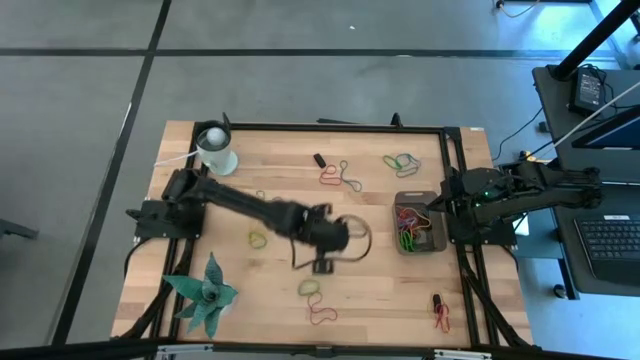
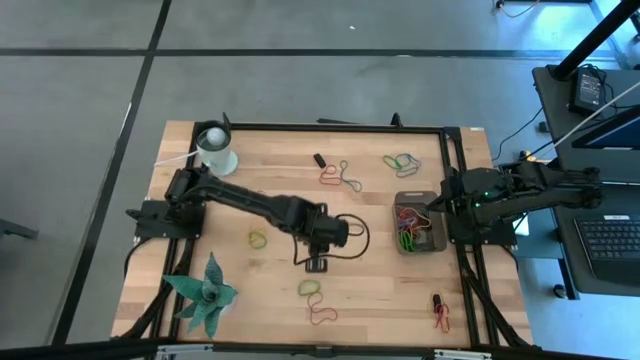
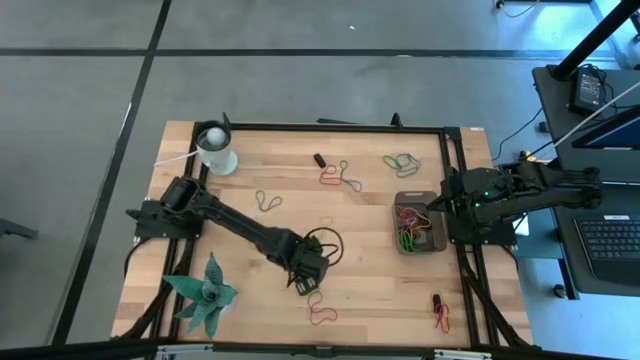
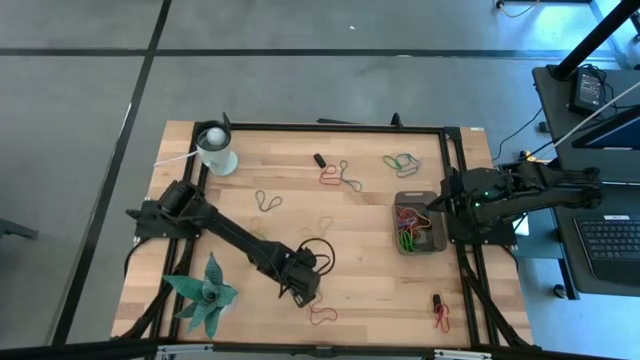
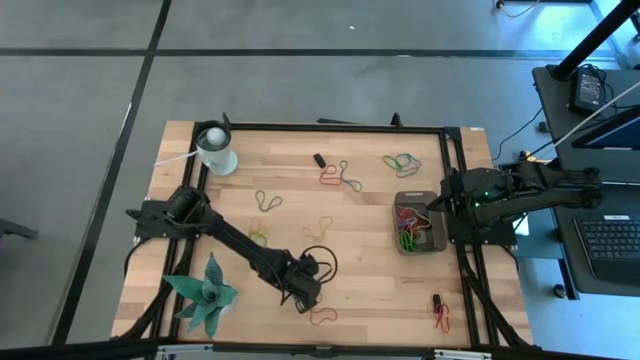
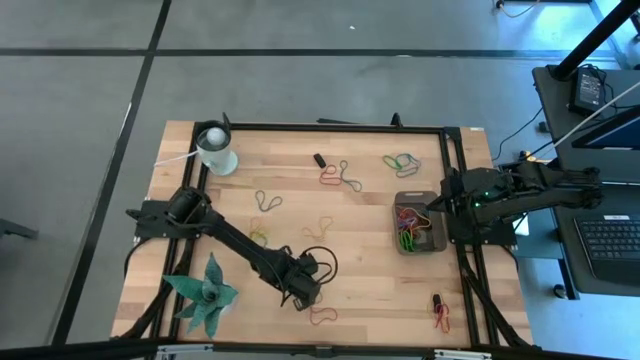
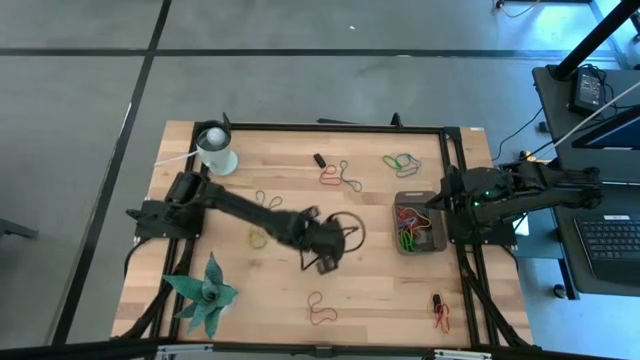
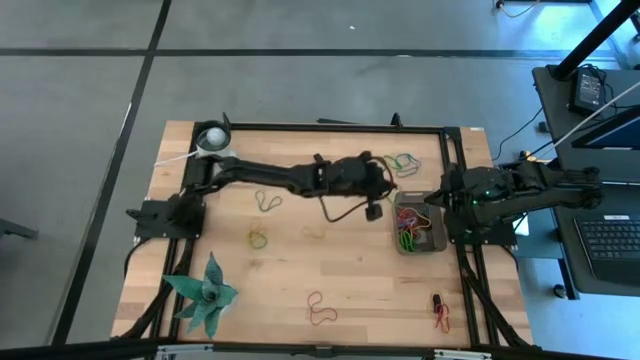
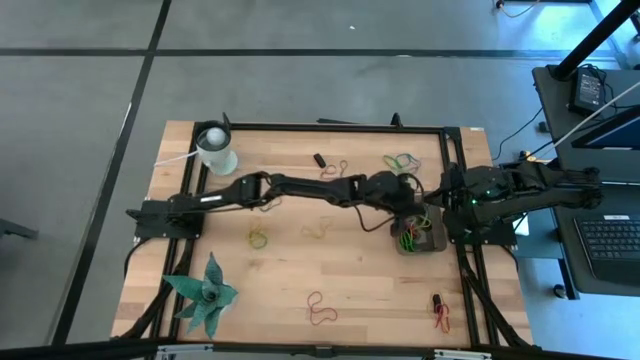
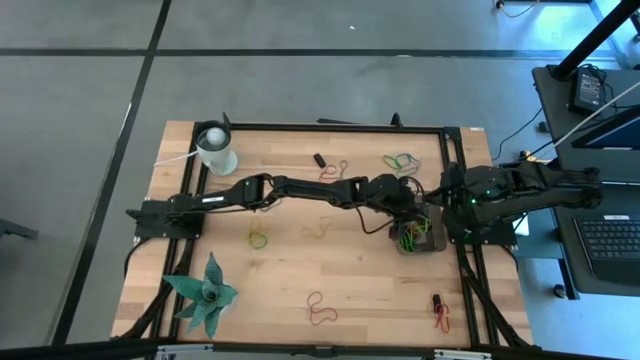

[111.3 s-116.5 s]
Task: Pick and place rubber bands into bin
Put the green rubber band into the black bin

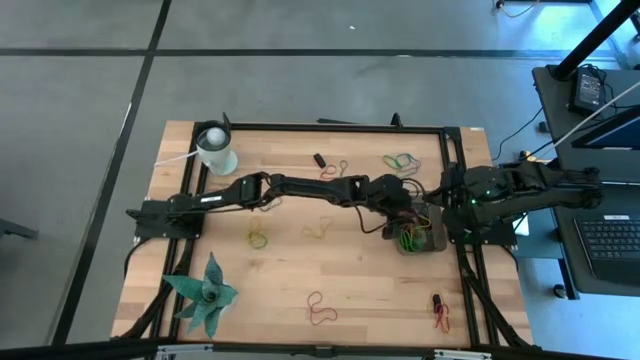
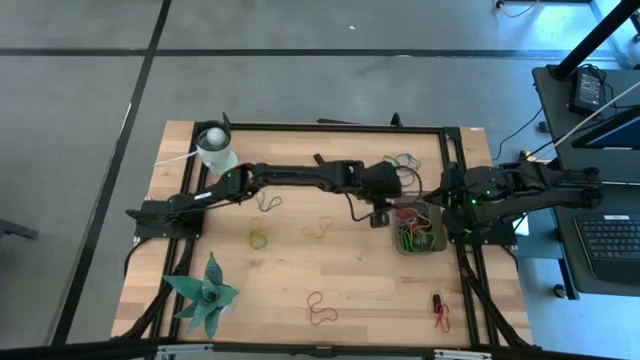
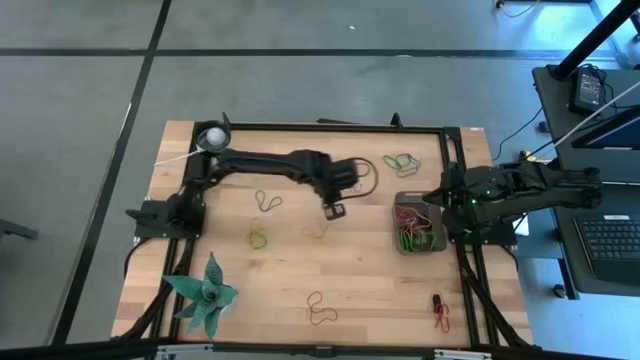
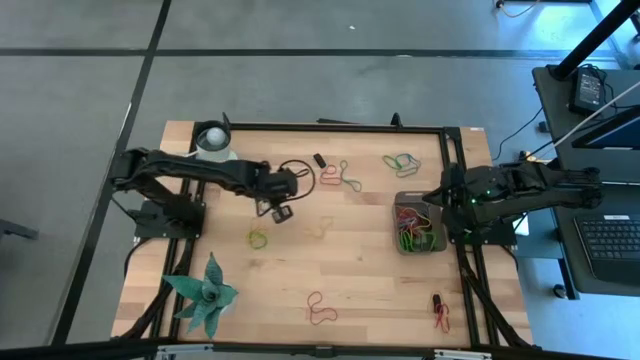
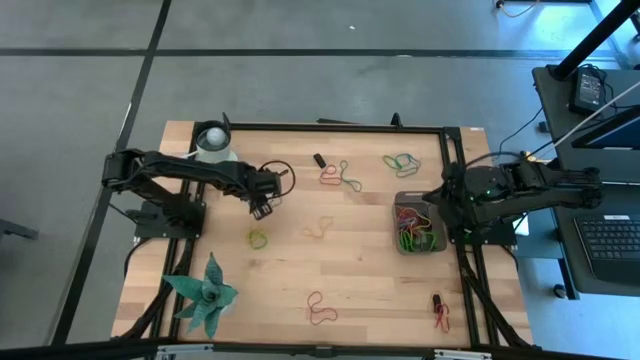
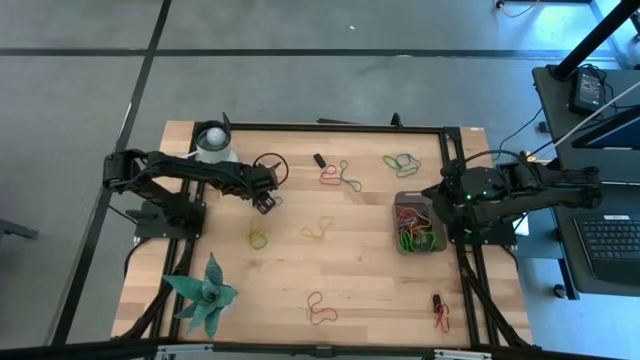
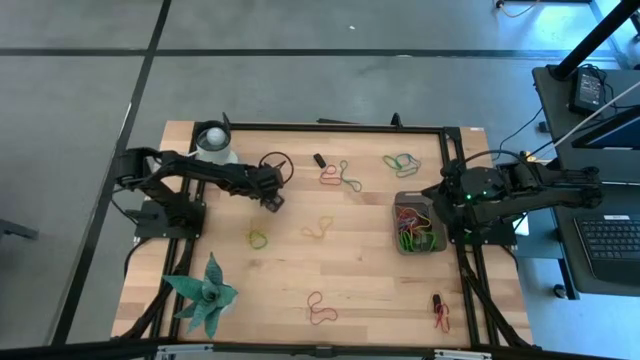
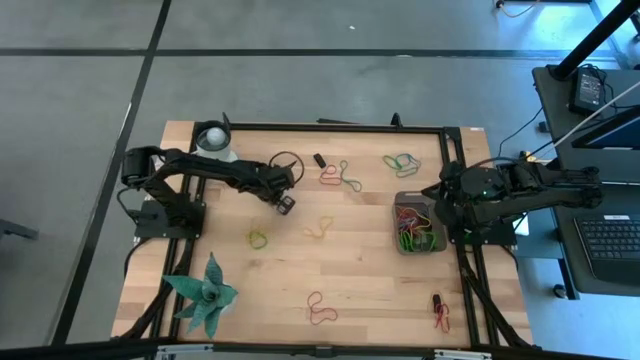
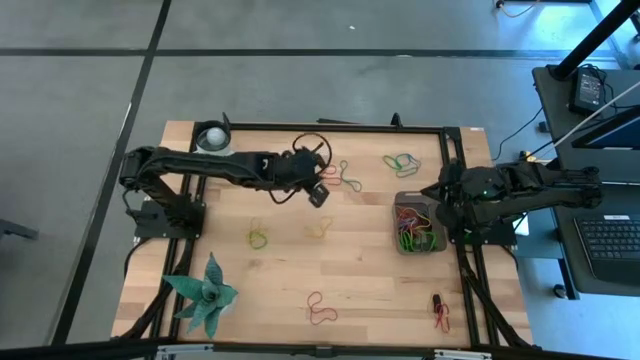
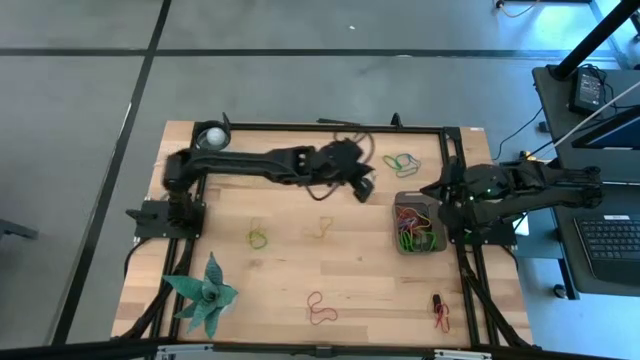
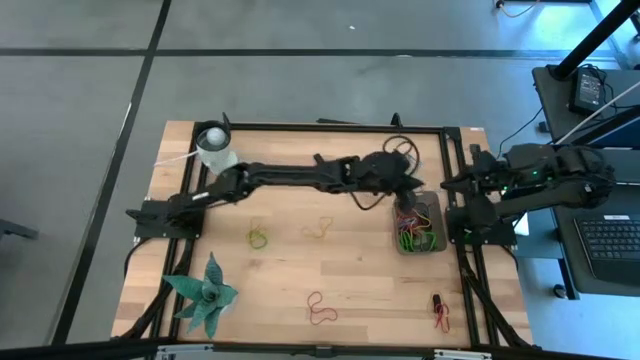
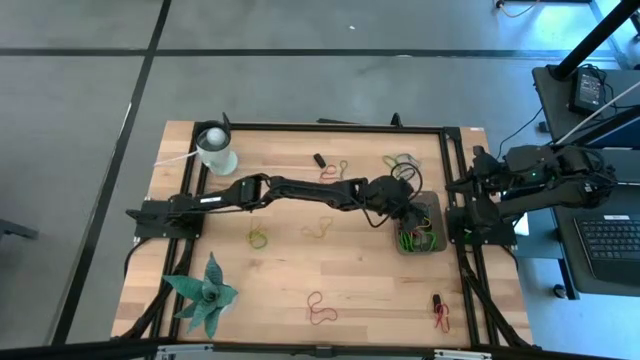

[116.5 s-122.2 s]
Put the blue rubber band into the black bin

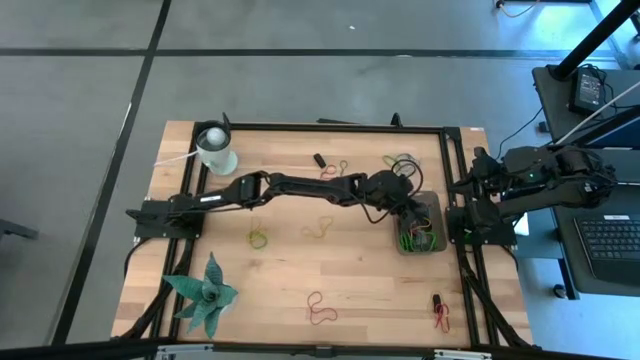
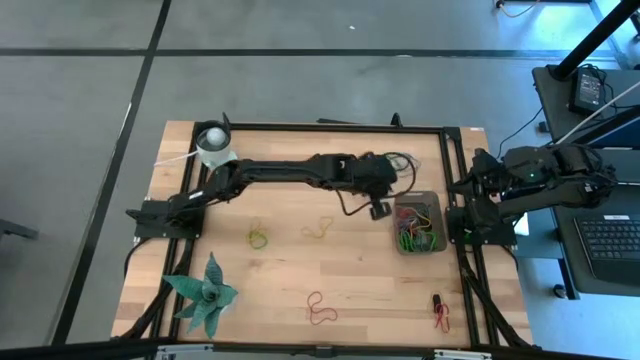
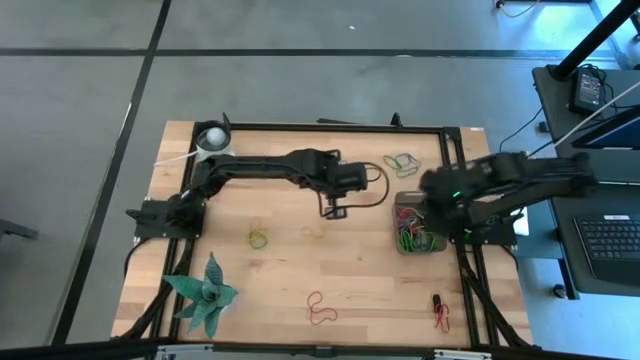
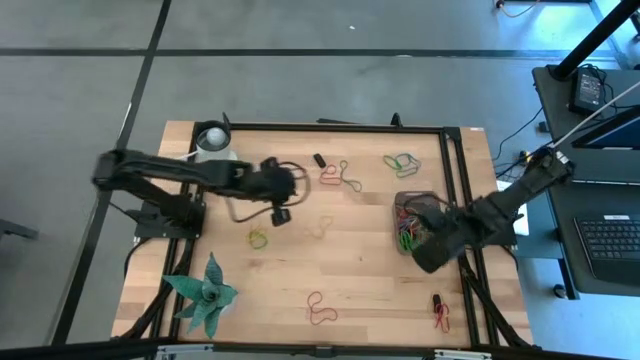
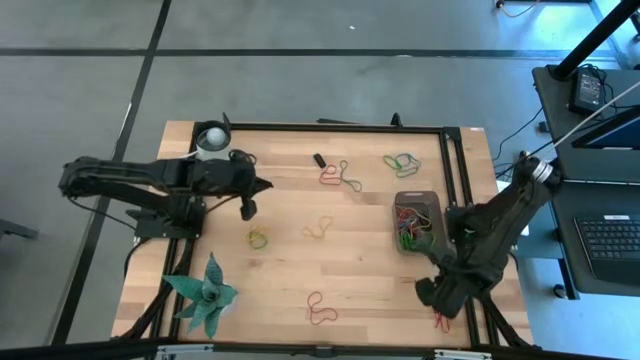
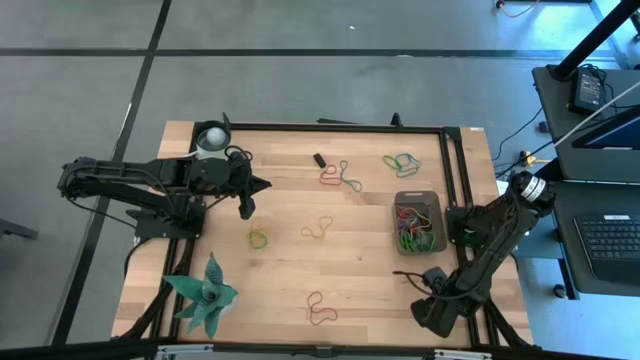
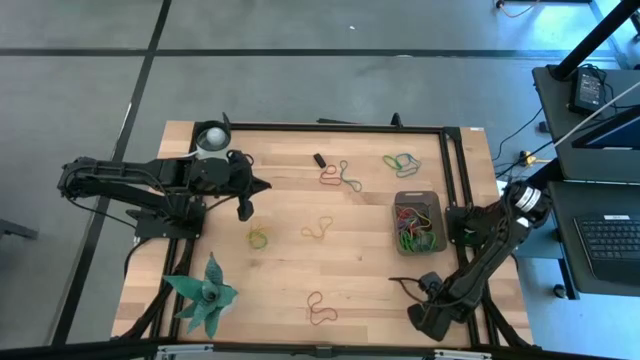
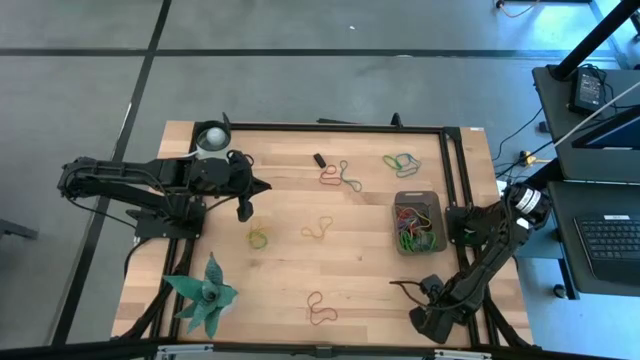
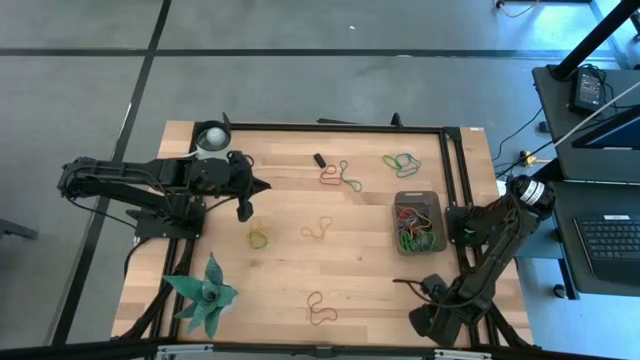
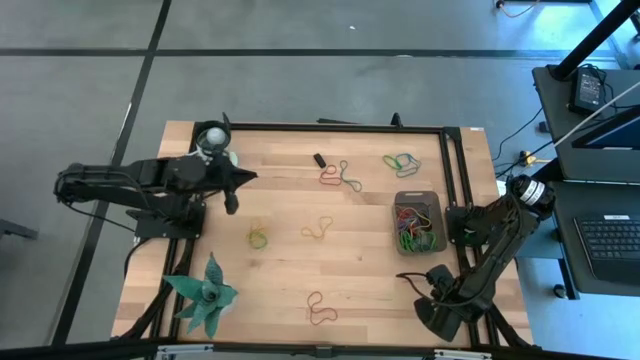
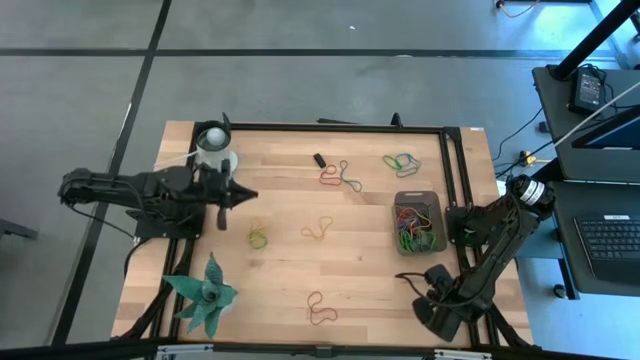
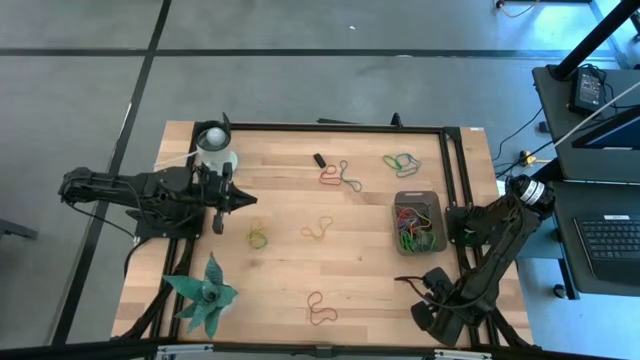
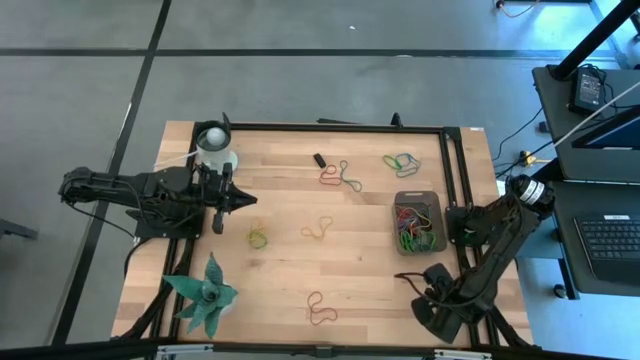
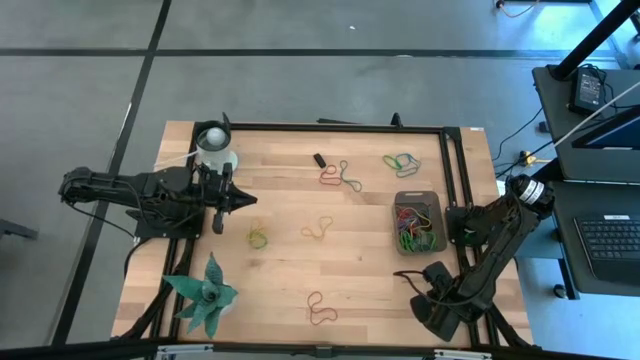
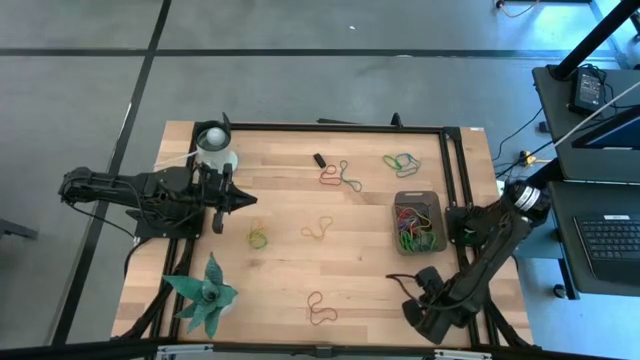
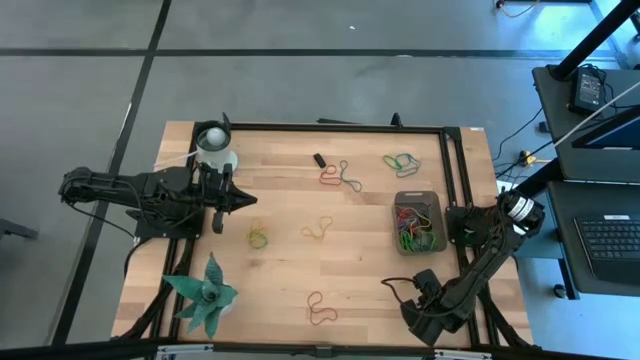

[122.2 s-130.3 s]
Put the black rubber band into the black bin

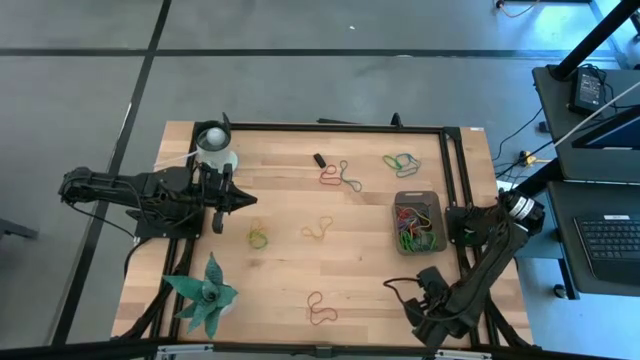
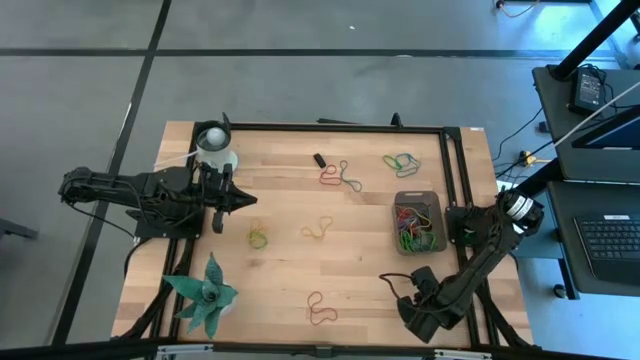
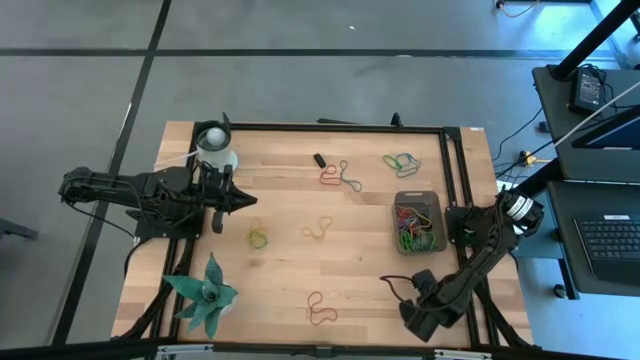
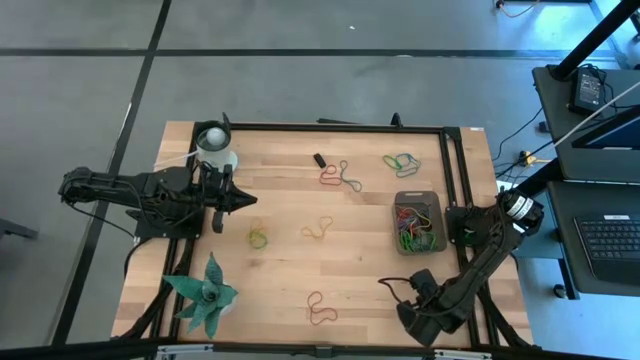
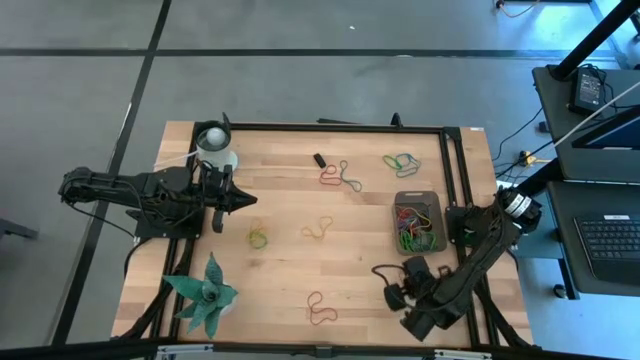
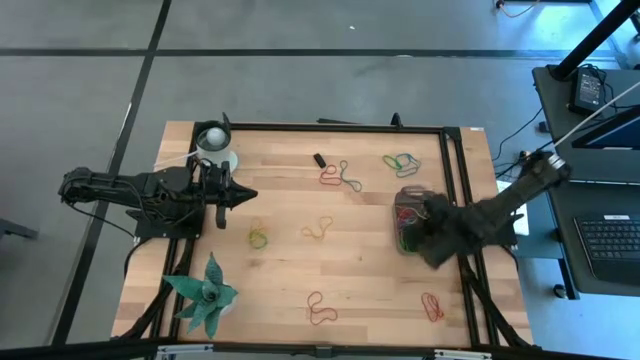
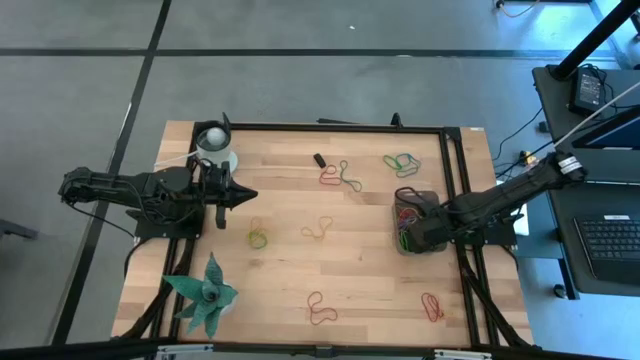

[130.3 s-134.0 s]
Put the black rubber band into the black bin
